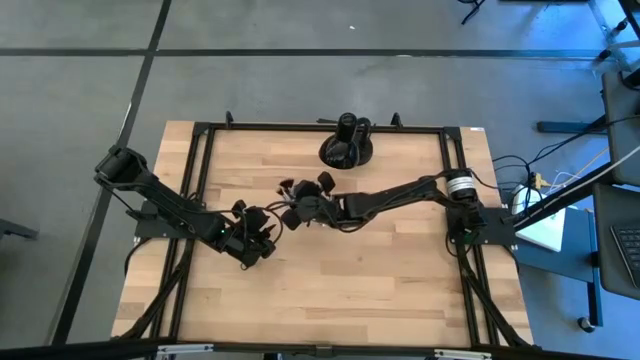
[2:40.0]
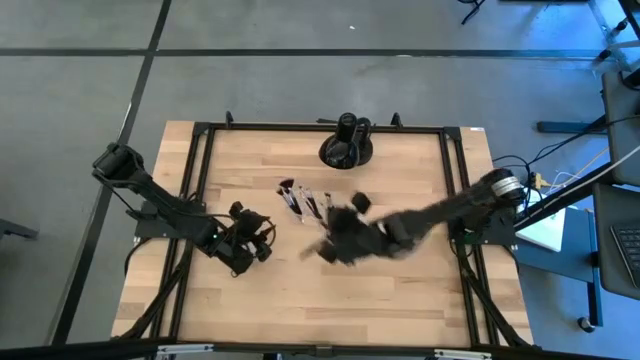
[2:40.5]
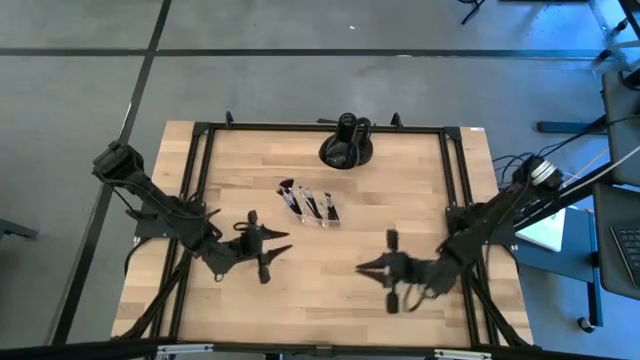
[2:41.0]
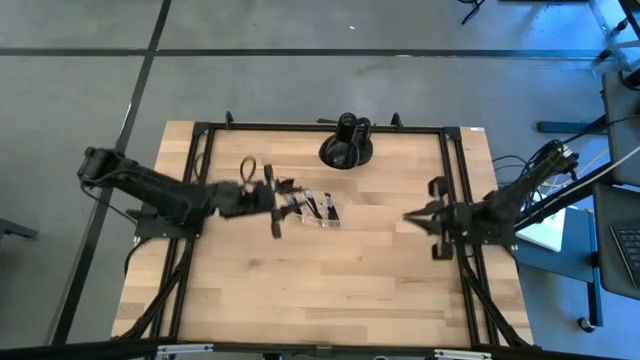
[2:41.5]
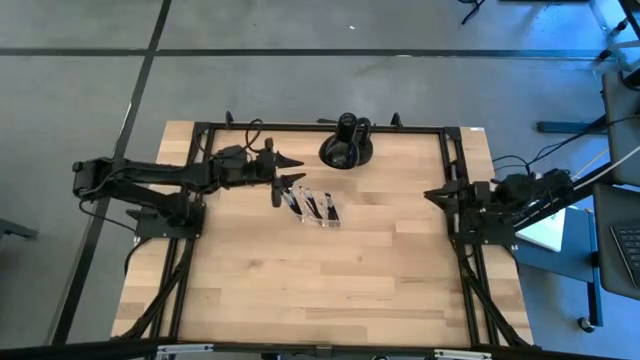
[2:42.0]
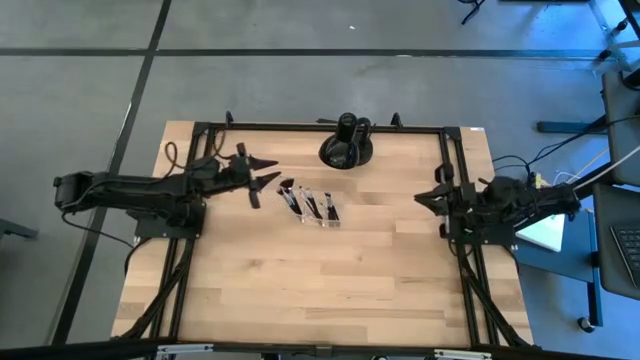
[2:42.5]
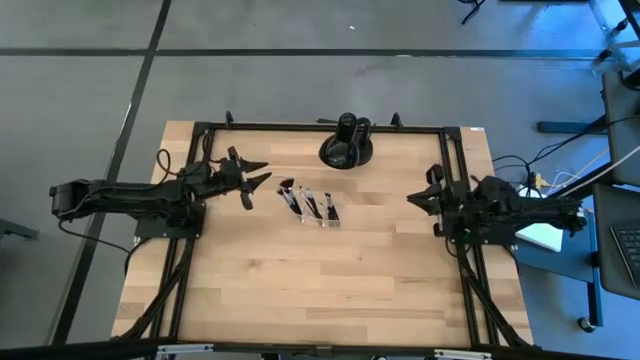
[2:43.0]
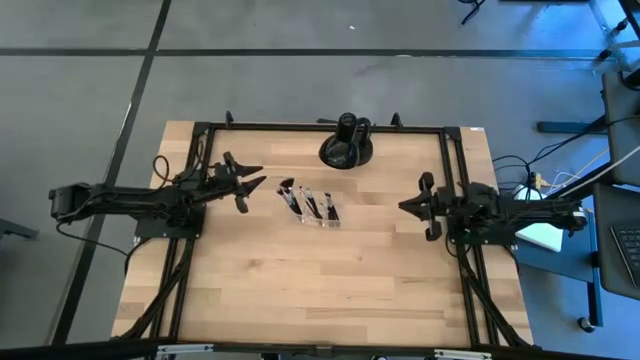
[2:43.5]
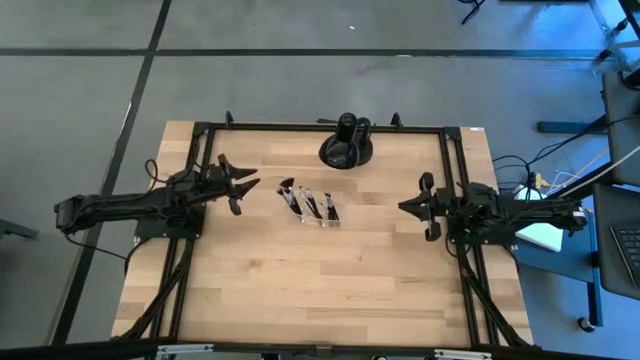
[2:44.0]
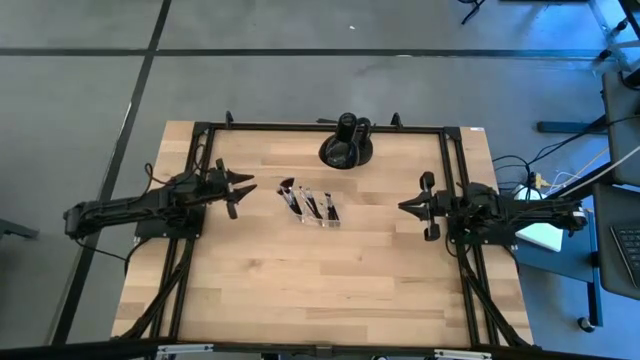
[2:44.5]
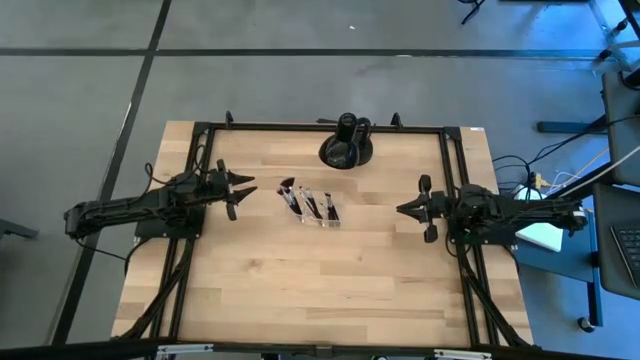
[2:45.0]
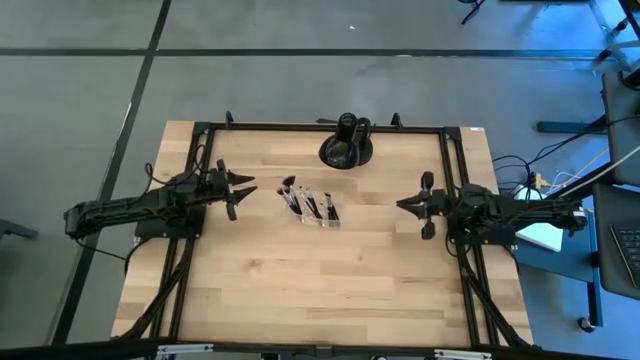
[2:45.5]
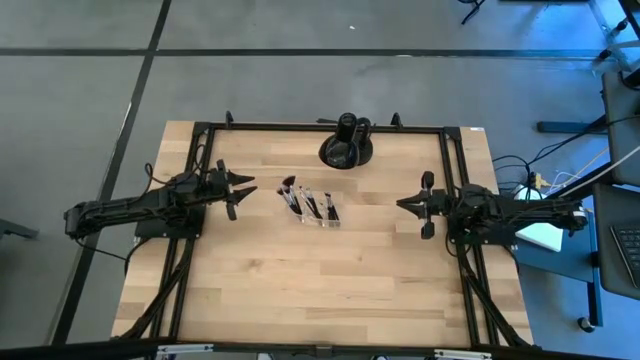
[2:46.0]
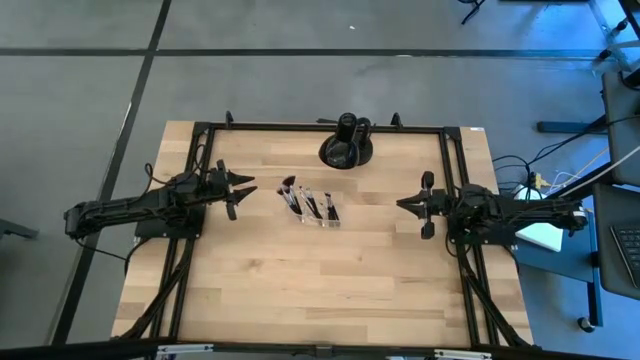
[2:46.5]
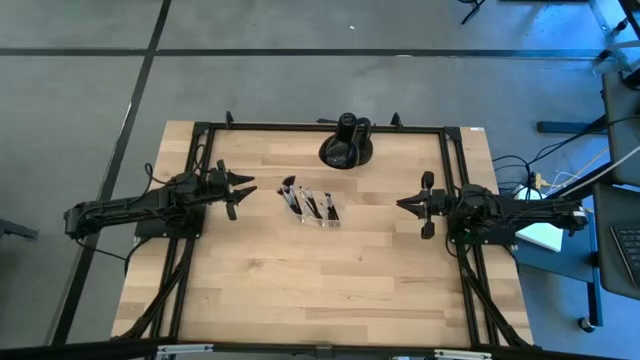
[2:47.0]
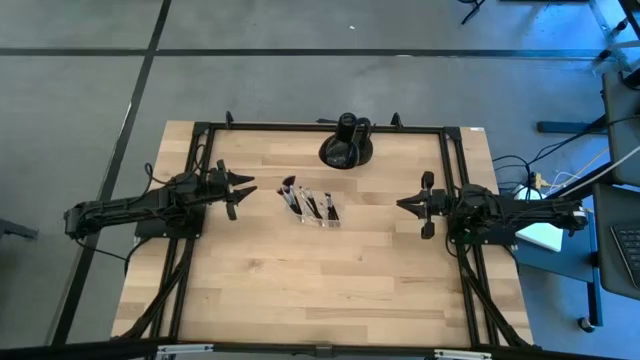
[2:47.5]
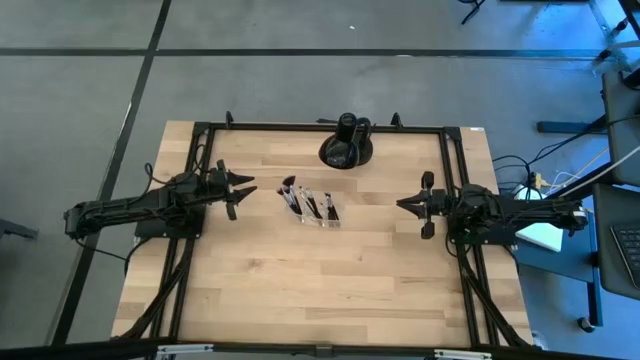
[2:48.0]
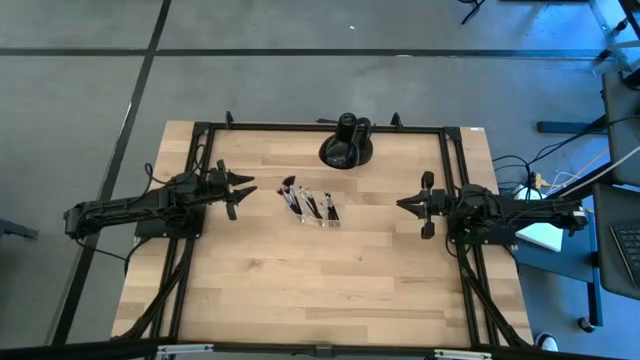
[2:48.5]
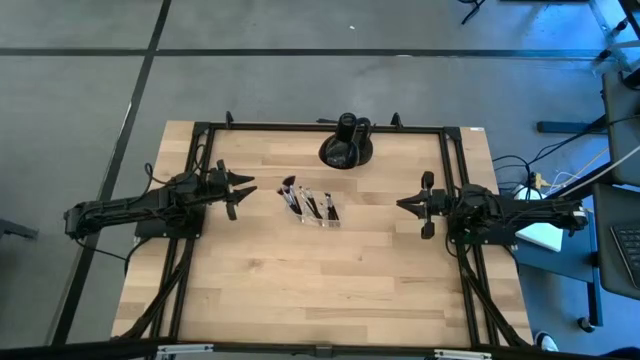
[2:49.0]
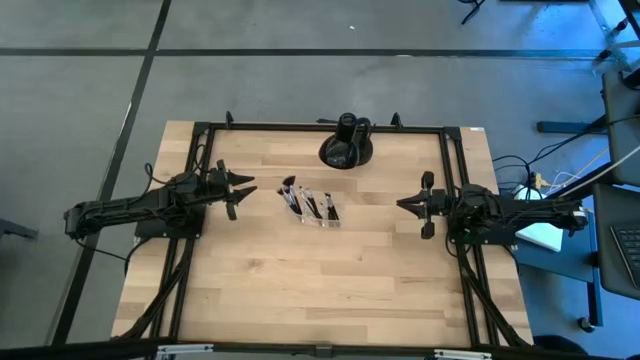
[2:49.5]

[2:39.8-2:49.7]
Task: Pick & Place Makeup Supplies
Return to Home Position

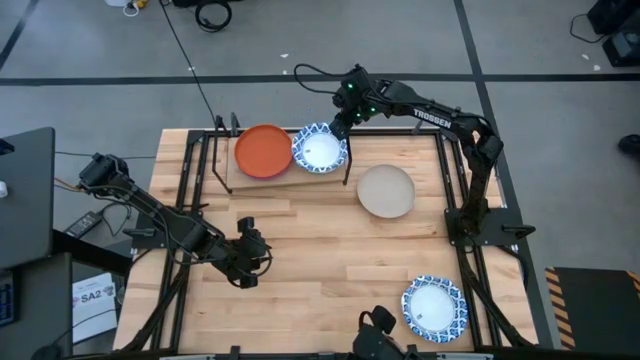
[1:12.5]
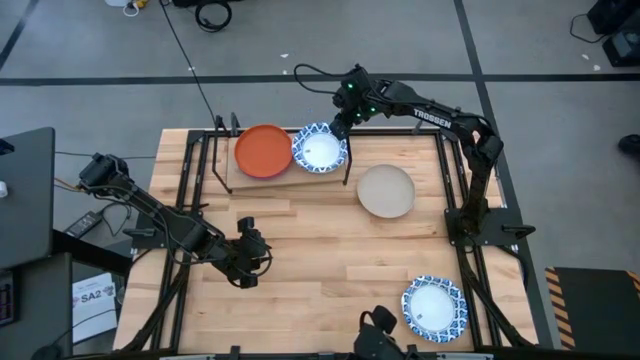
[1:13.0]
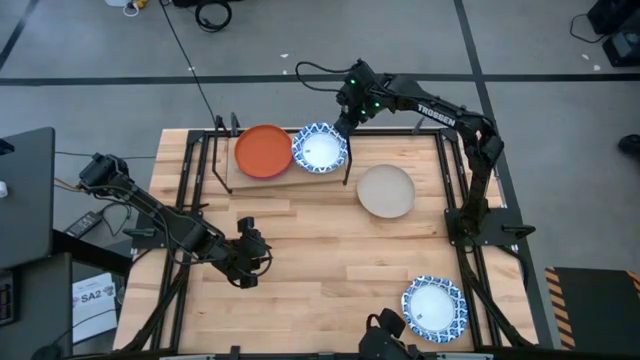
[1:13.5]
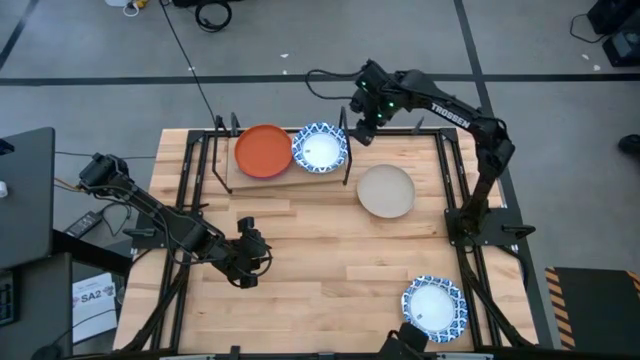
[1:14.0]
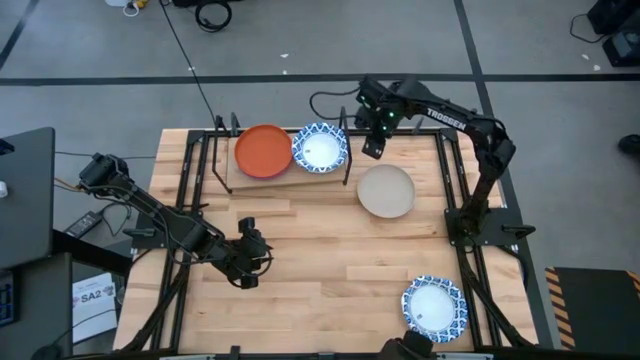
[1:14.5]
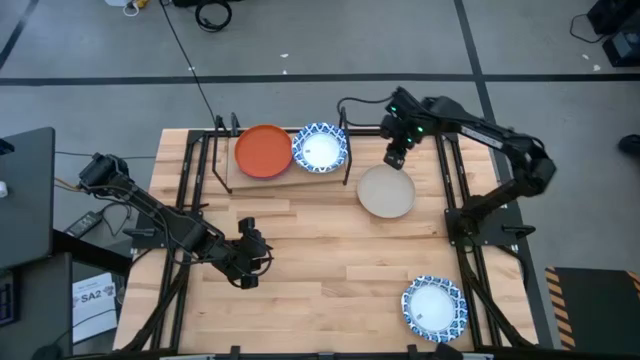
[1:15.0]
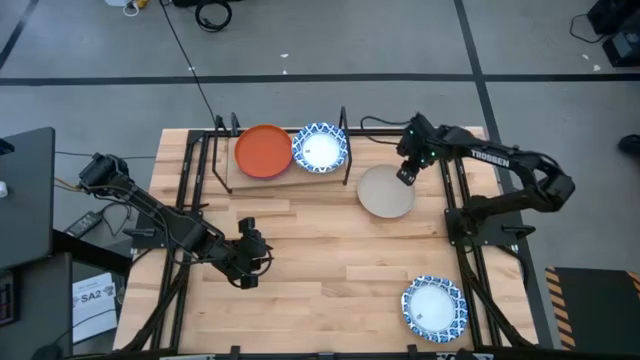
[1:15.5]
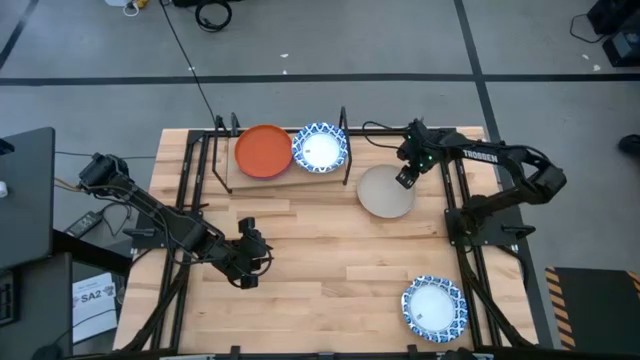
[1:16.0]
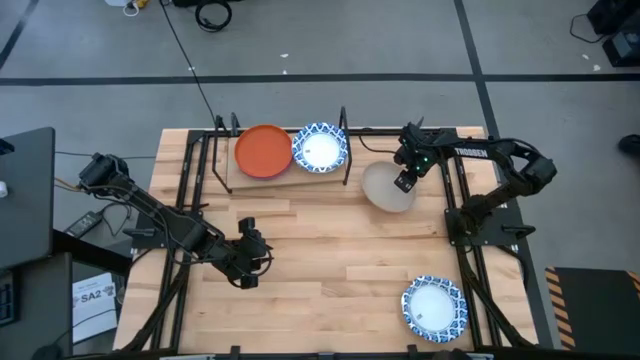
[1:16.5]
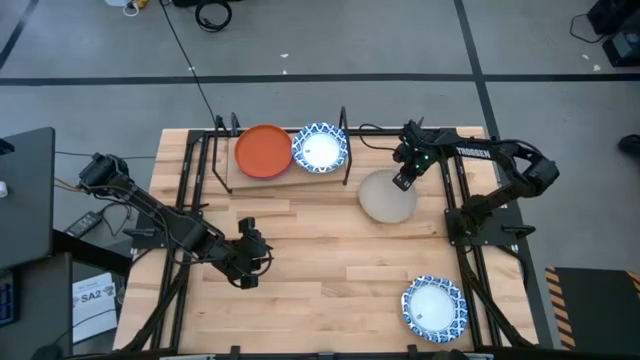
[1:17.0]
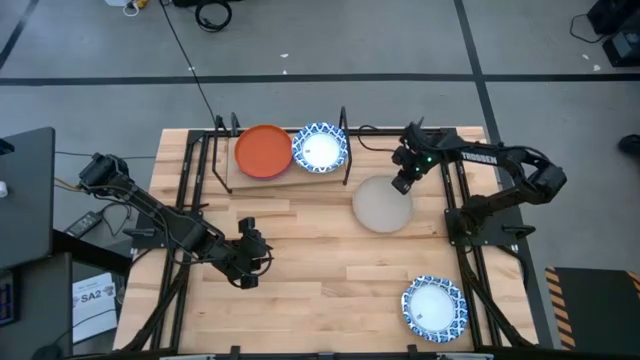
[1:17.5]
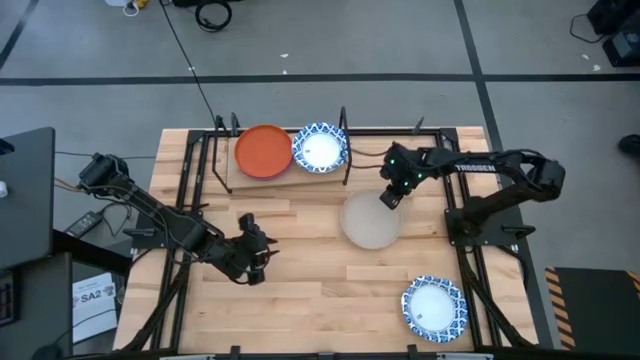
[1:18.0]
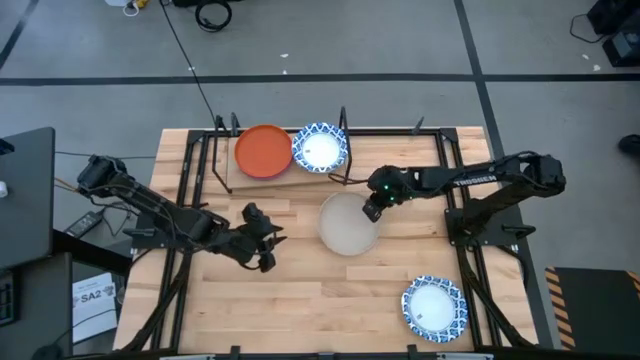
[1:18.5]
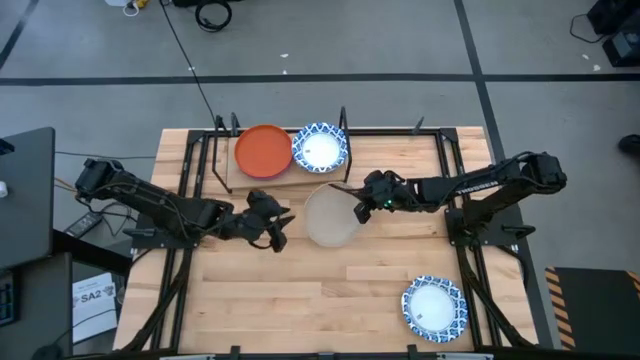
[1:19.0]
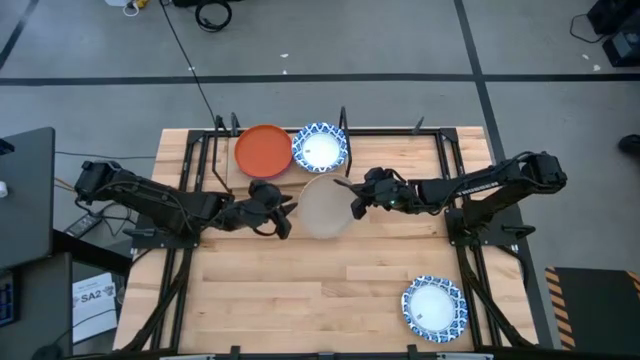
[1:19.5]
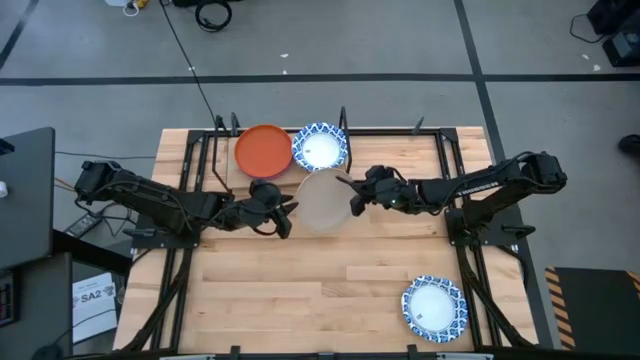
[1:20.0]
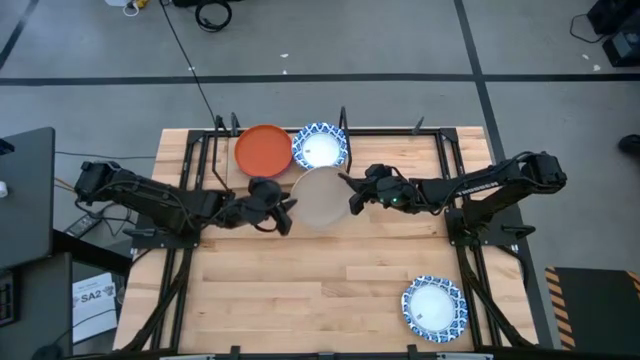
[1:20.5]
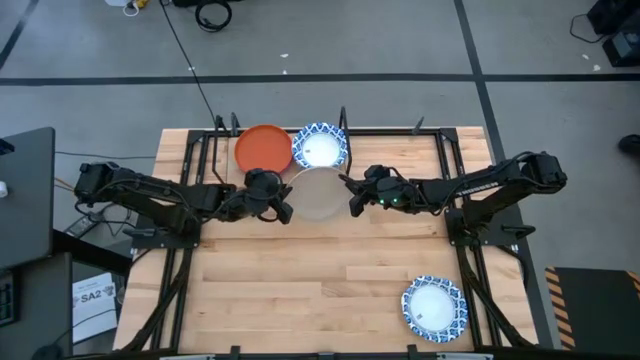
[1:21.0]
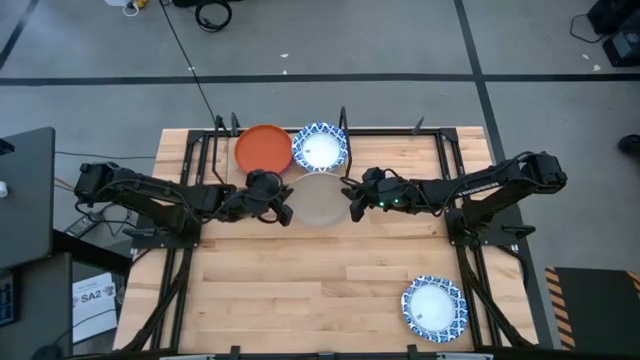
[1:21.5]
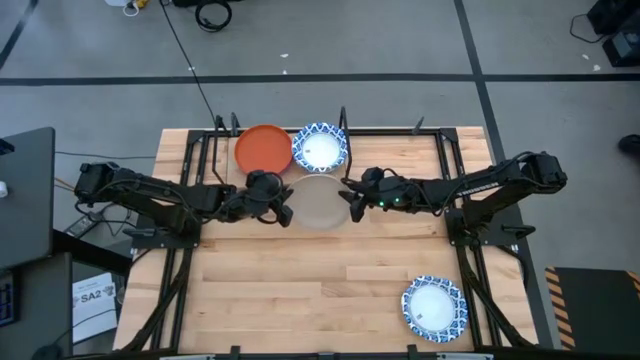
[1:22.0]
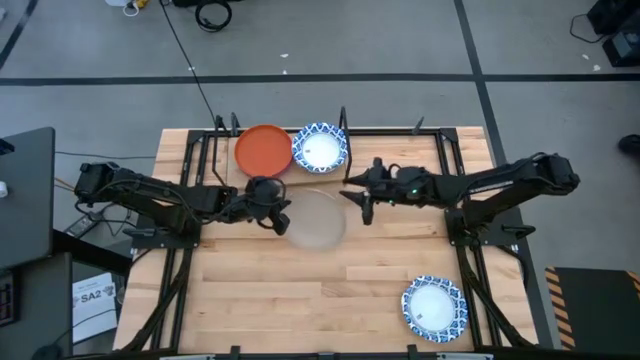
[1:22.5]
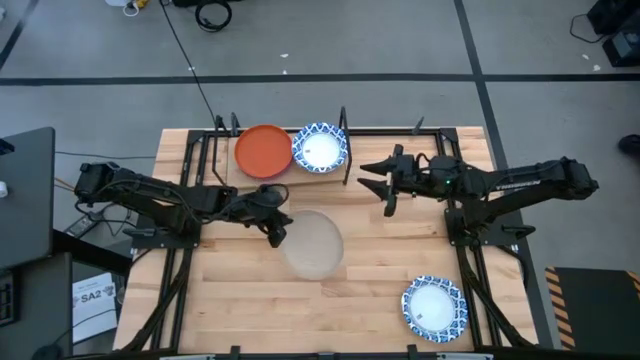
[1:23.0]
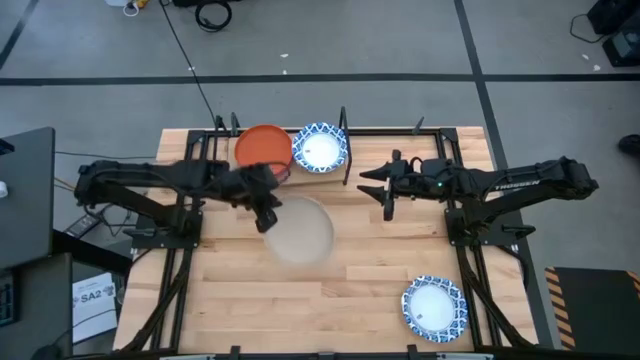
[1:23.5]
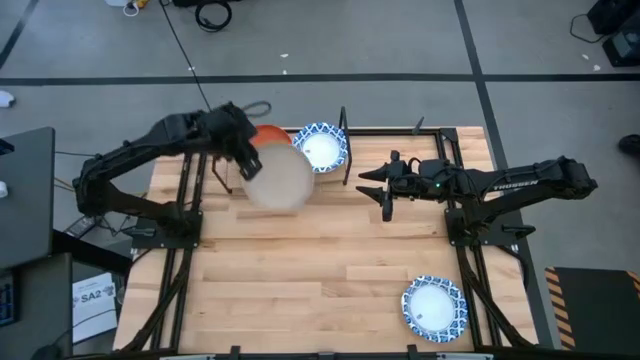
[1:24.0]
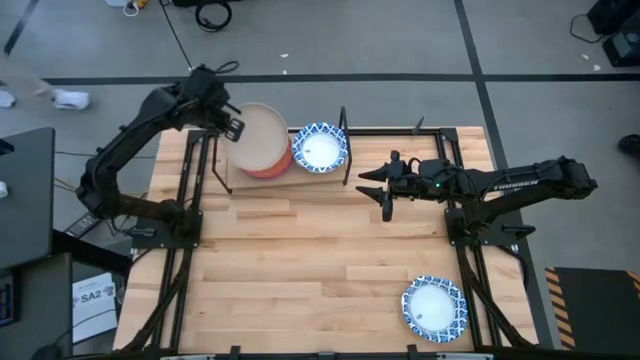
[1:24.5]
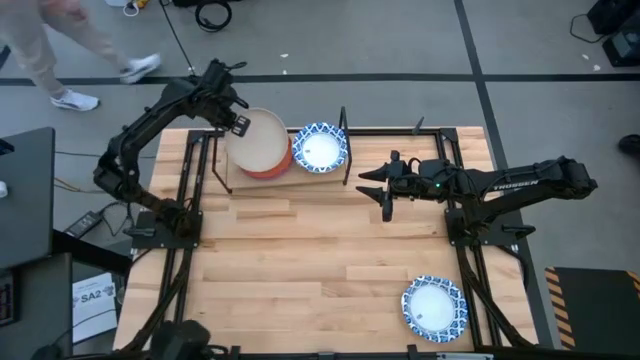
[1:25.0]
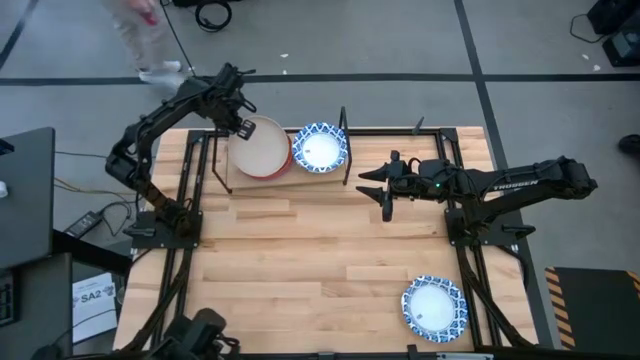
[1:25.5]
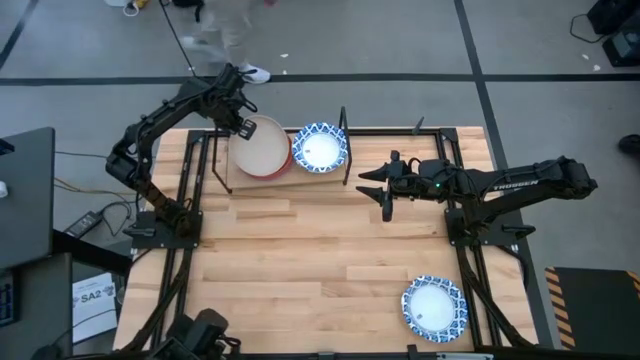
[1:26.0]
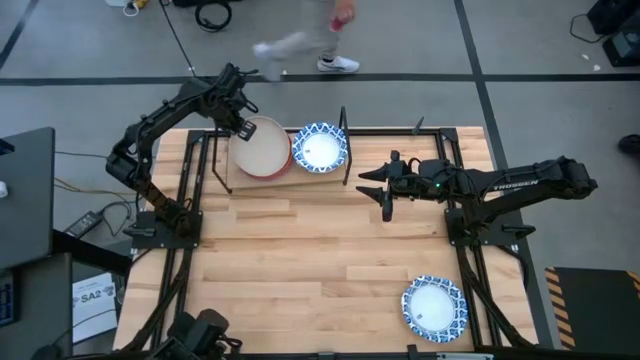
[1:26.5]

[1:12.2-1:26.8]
Task: Place and stack plates onto a shelf
Stack the gray plate on top of the orange plate on the shelf
